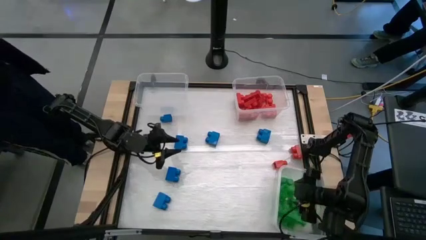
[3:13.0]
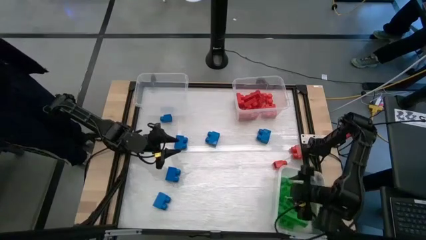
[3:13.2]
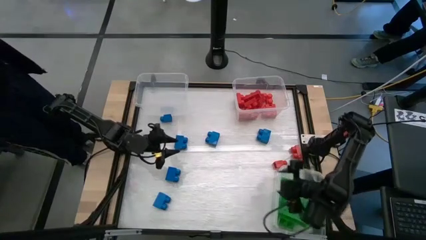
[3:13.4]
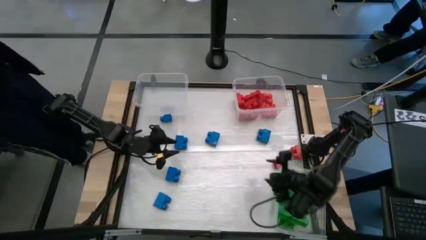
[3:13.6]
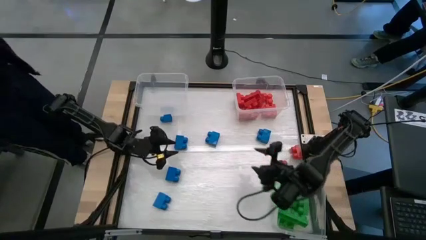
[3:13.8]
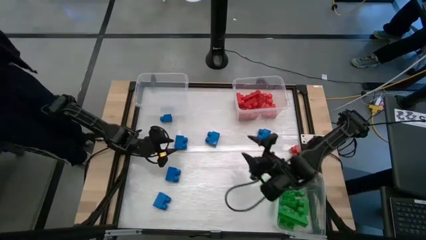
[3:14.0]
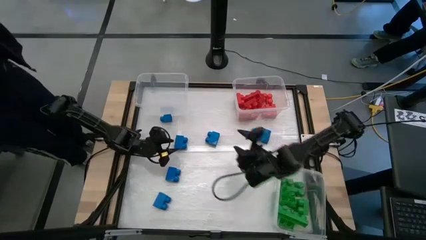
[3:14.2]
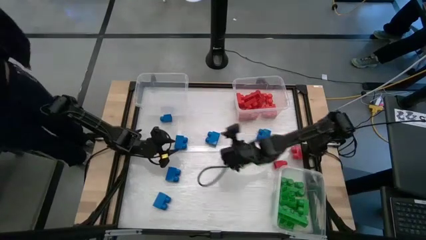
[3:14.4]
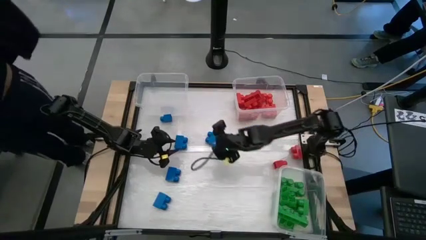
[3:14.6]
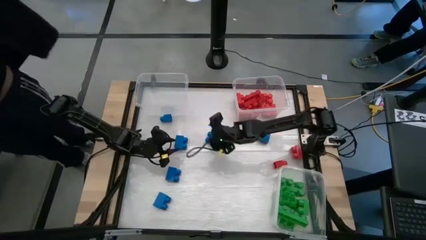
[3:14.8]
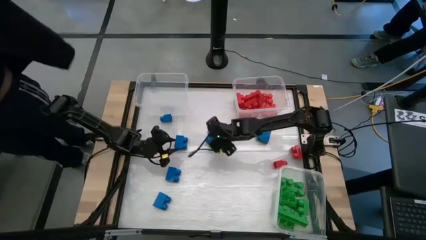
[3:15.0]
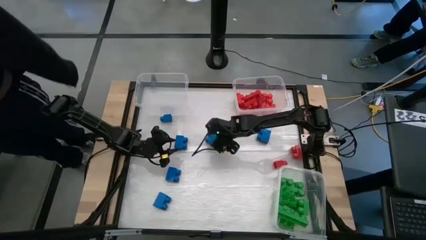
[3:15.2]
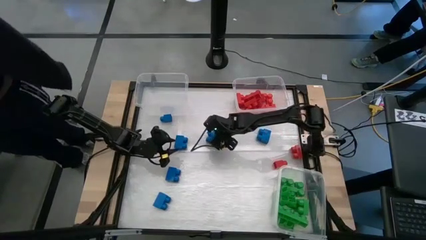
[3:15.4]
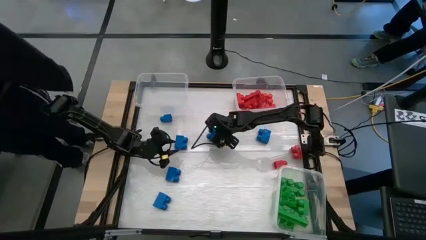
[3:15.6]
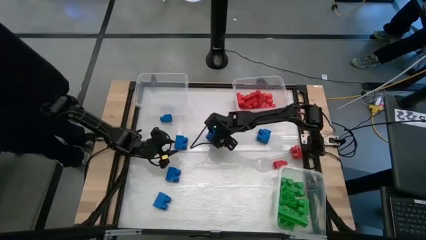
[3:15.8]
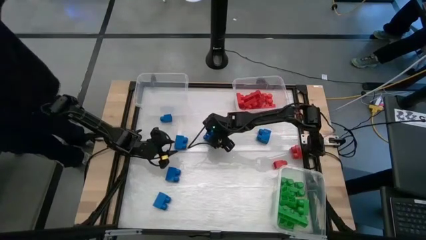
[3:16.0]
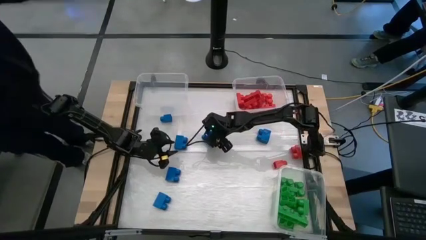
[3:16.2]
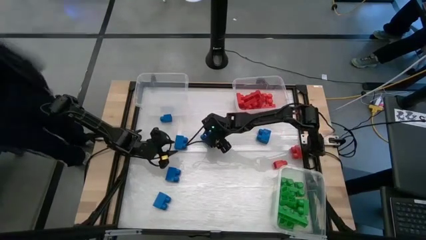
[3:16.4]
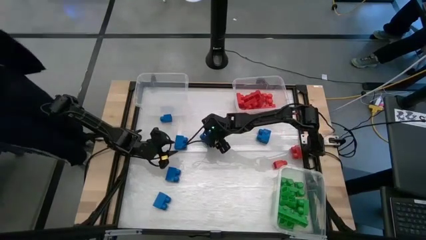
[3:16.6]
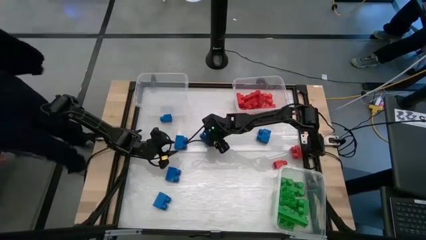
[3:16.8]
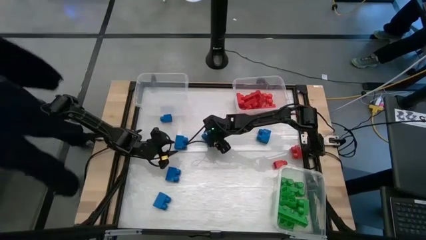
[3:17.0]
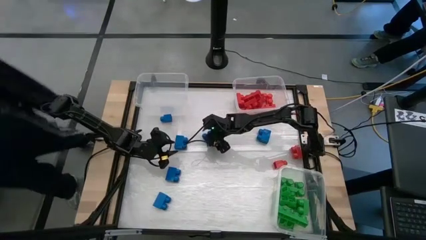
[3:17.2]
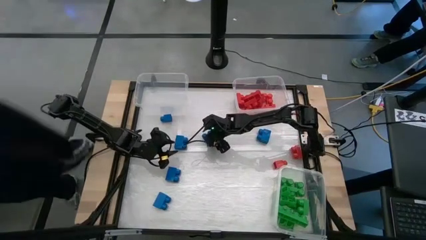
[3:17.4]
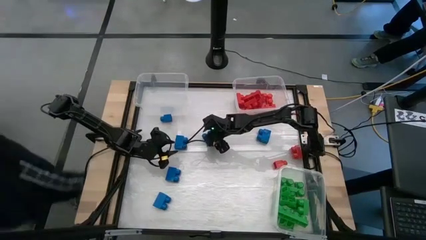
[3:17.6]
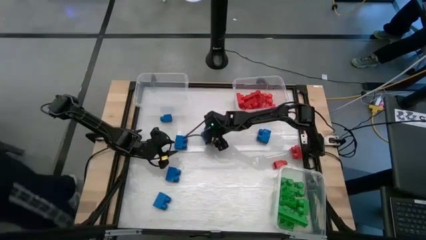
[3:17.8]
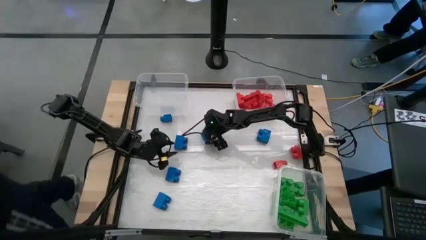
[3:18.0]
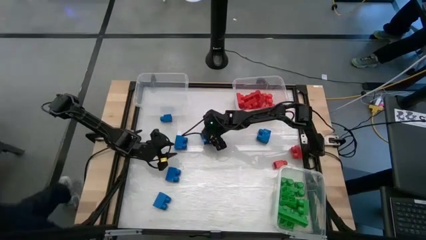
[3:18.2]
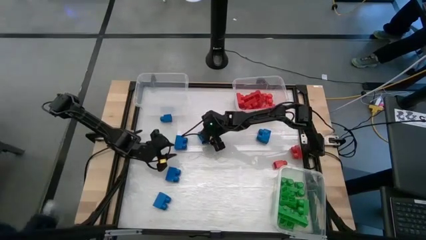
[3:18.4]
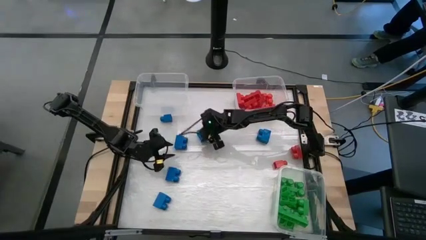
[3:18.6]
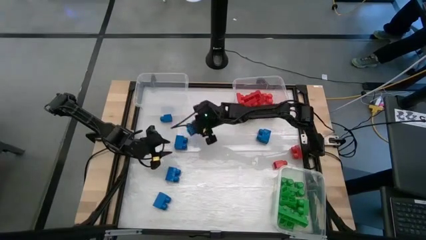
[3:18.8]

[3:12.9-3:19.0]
Task: Sort blocks
Put the blue game piece into the top left transparent bin

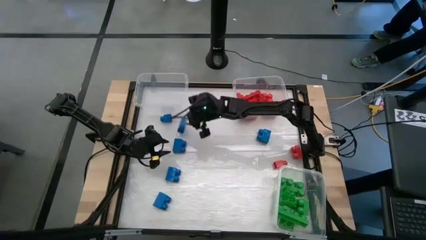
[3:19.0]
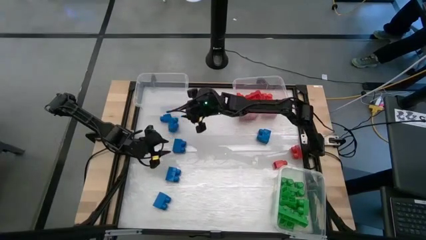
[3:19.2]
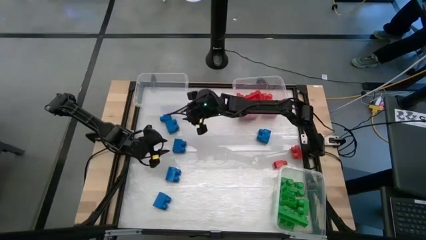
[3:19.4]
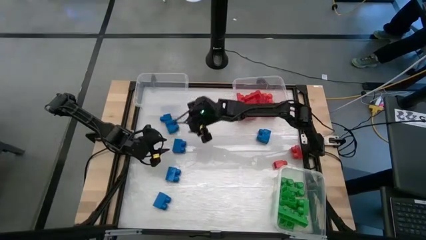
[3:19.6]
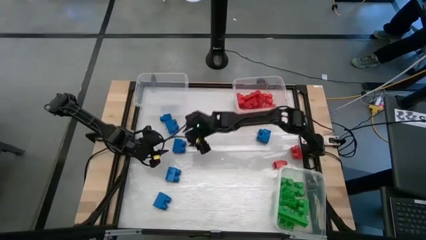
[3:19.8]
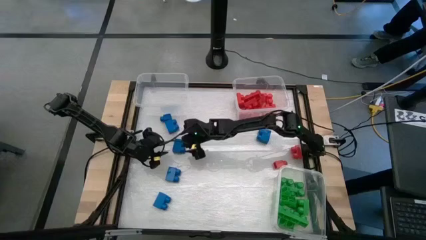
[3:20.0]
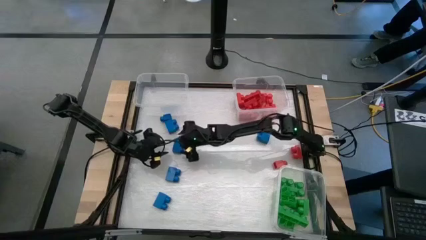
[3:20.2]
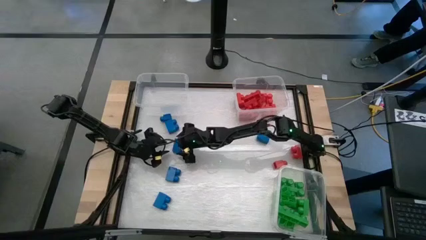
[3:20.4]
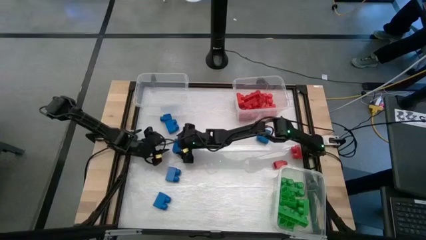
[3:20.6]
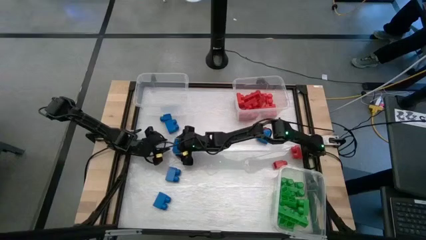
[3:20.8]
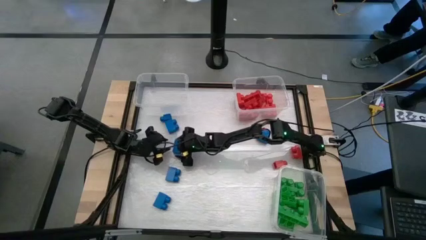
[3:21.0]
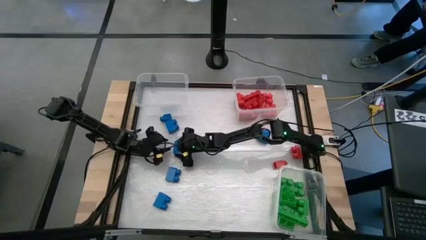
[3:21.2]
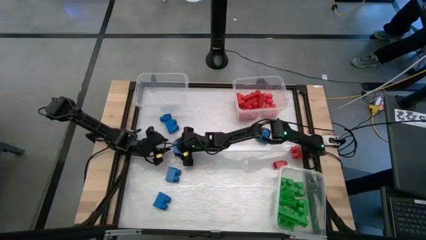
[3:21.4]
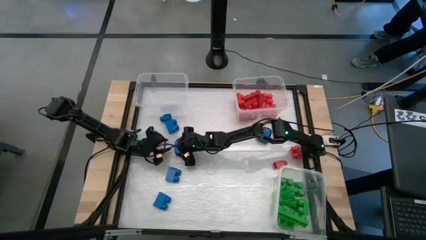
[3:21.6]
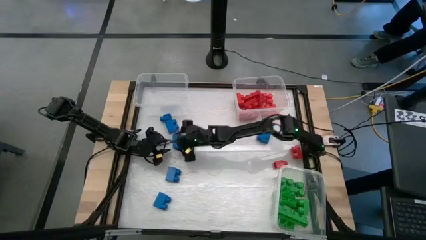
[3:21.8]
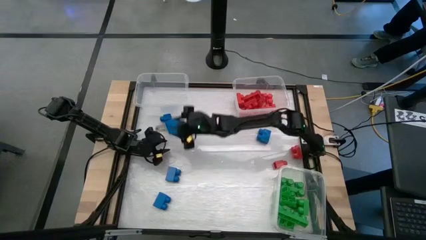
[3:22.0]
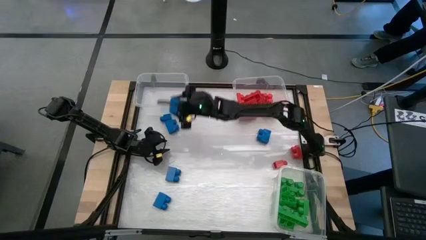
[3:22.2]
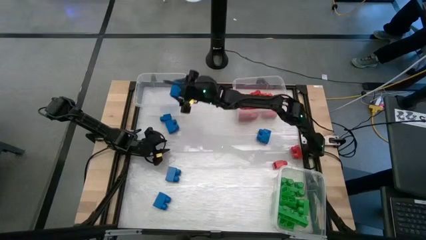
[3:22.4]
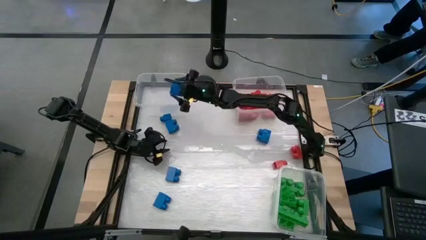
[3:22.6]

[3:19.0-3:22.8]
Put the blue game piece into the top left transparent bin

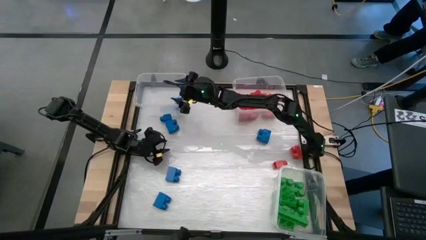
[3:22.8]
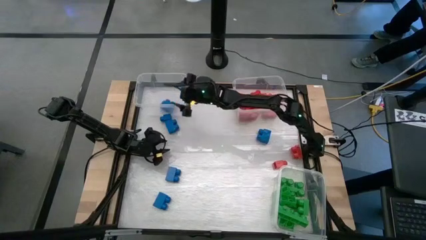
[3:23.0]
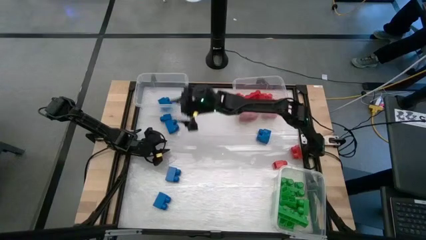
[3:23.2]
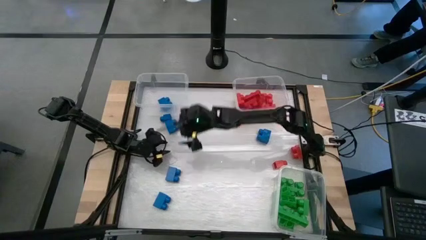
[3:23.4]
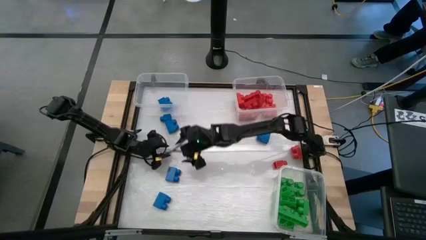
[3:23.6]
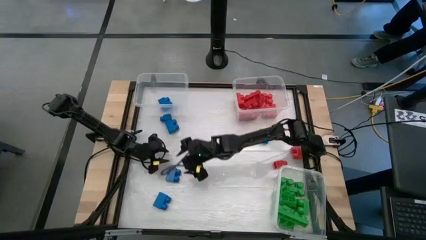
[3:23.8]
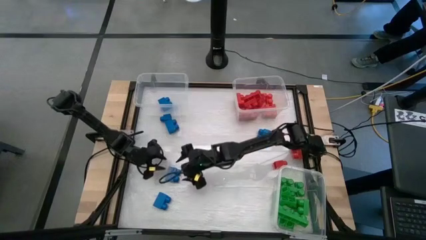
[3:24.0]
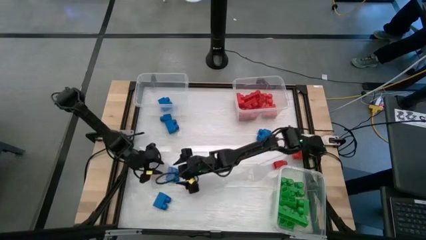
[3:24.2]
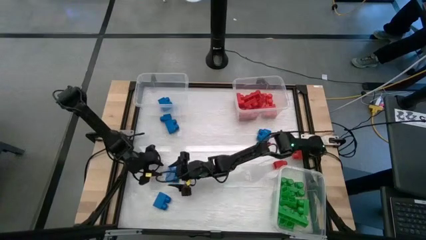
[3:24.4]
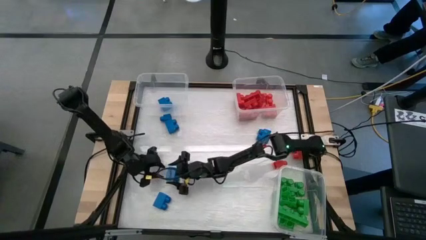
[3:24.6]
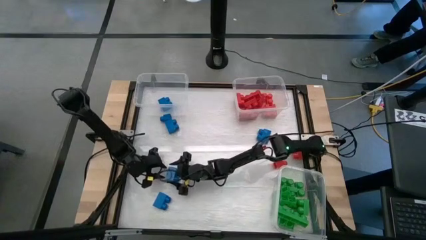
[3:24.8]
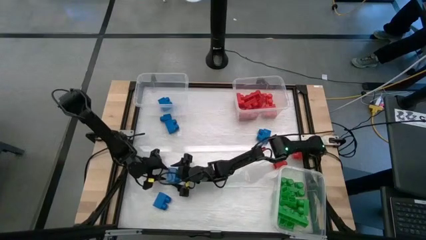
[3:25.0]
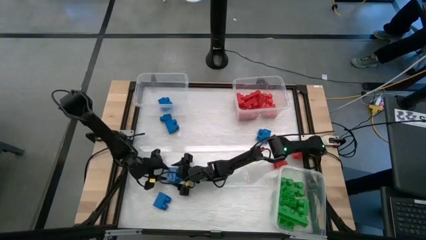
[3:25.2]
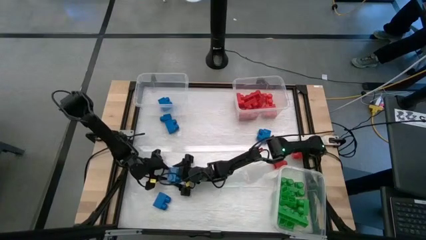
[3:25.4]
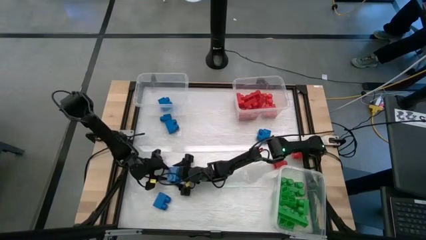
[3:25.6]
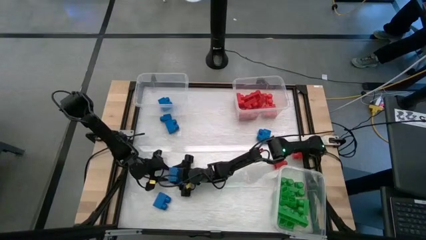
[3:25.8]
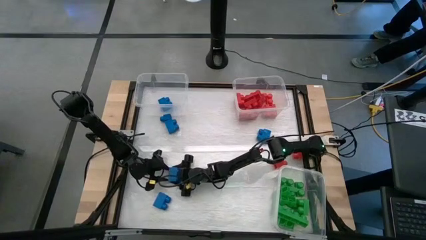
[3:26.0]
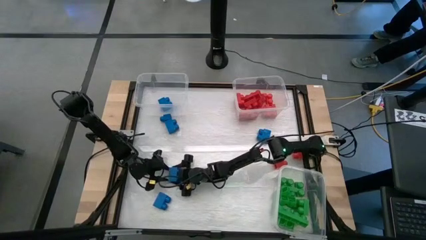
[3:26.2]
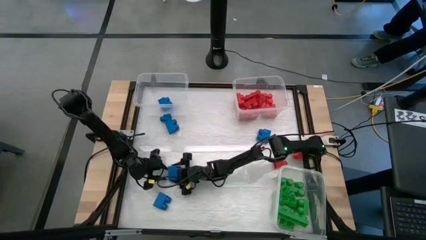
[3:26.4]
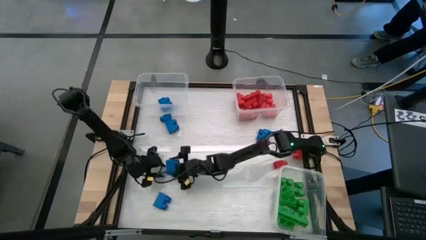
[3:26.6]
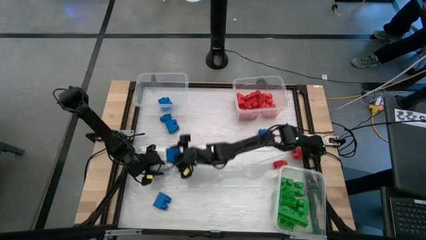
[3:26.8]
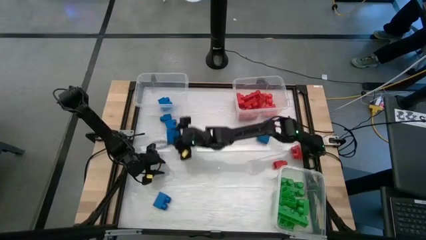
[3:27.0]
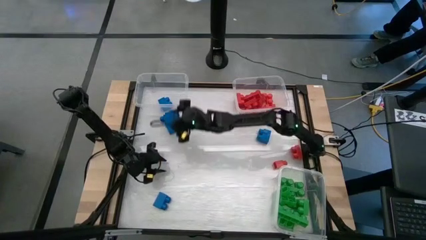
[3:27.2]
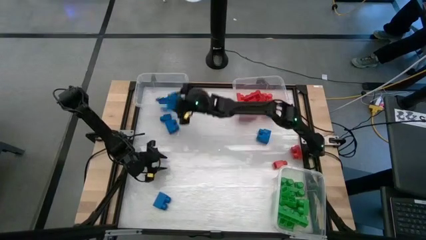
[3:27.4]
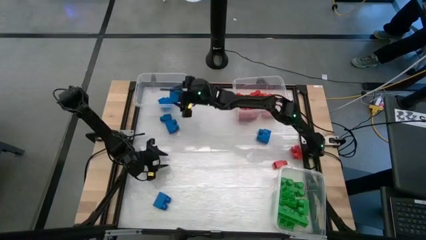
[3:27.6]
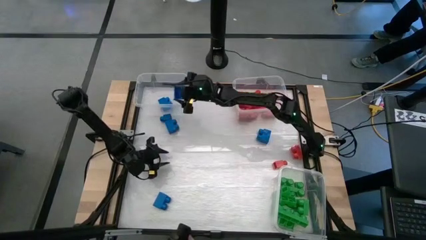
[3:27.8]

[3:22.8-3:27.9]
Put the blue game piece into the top left transparent bin
